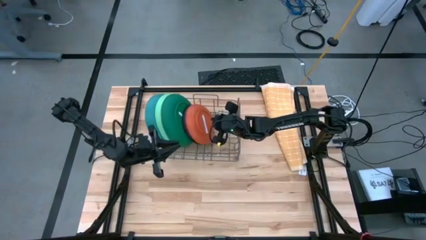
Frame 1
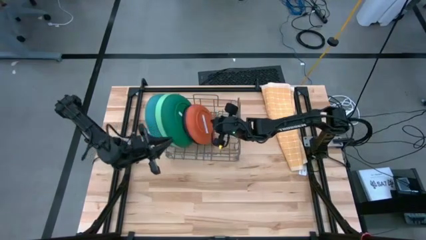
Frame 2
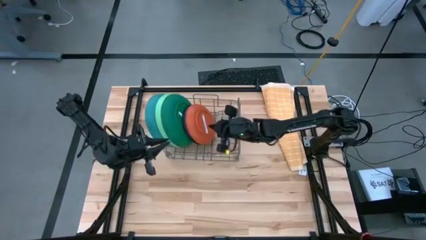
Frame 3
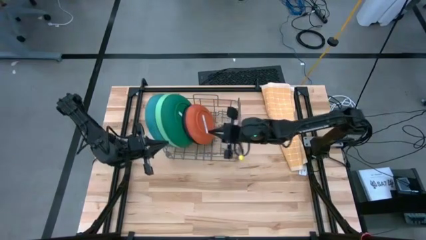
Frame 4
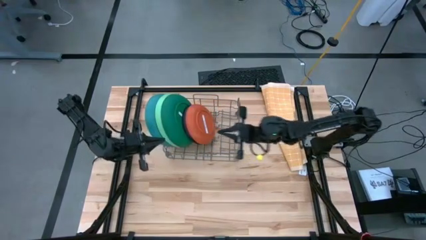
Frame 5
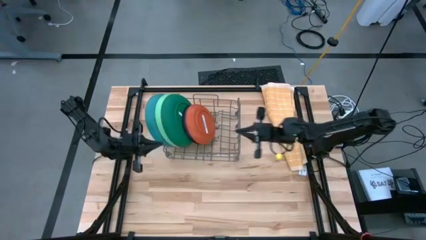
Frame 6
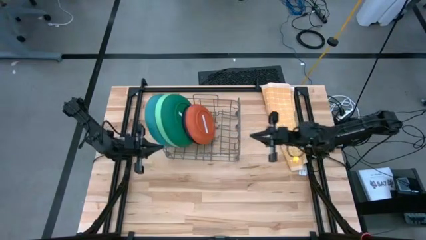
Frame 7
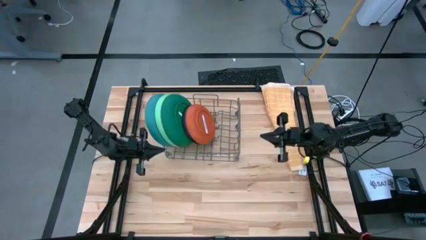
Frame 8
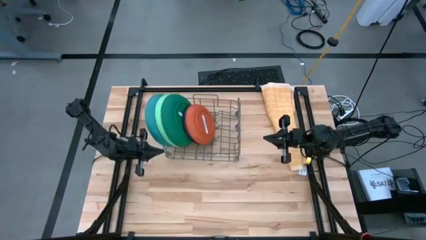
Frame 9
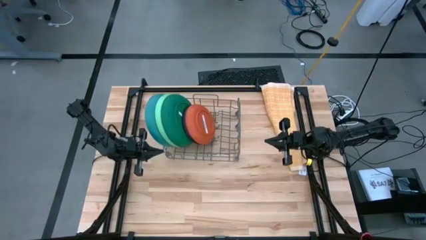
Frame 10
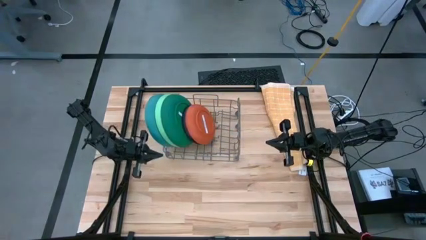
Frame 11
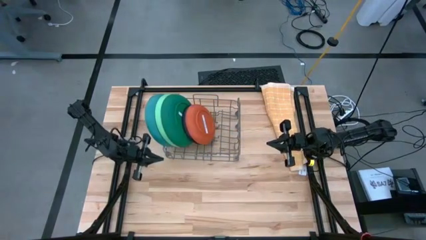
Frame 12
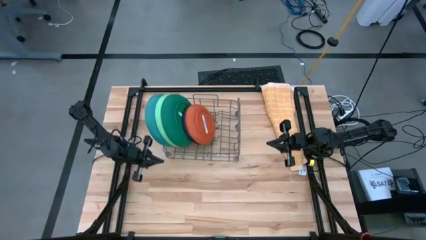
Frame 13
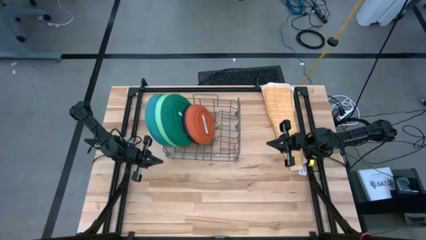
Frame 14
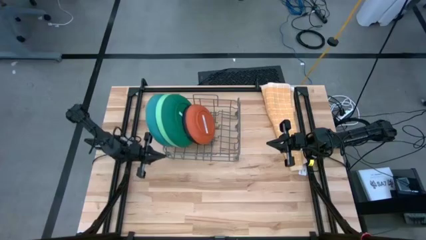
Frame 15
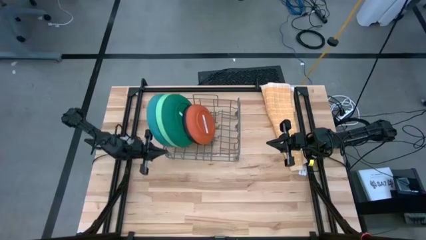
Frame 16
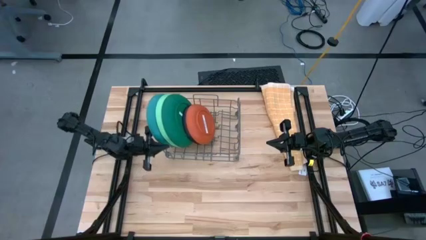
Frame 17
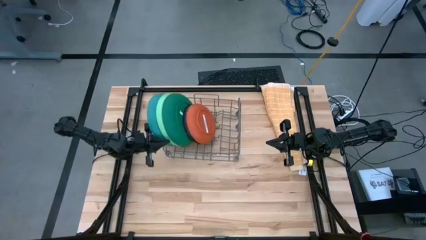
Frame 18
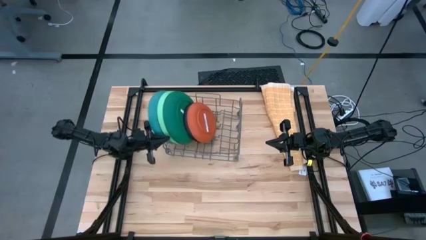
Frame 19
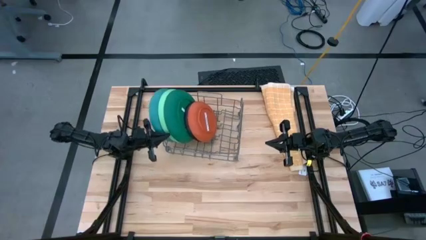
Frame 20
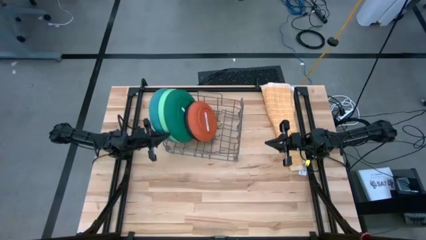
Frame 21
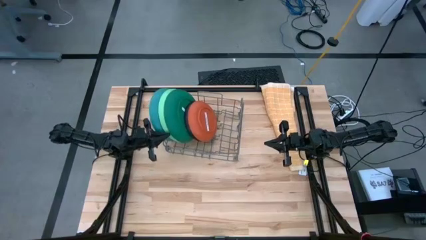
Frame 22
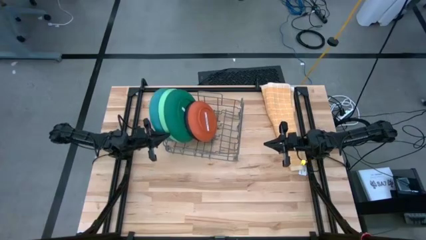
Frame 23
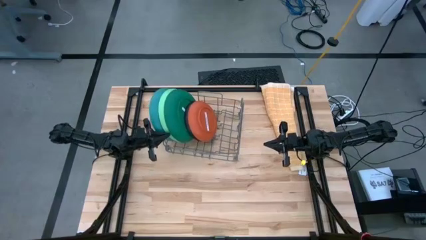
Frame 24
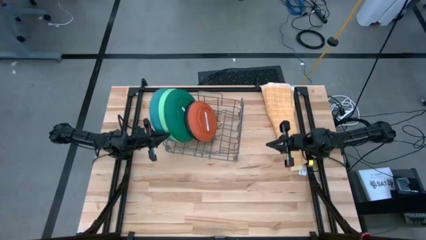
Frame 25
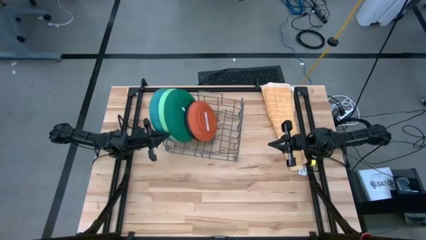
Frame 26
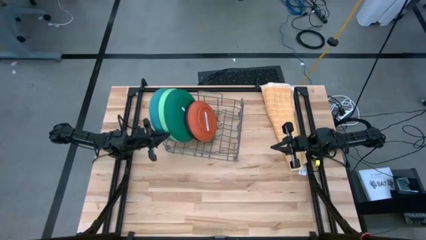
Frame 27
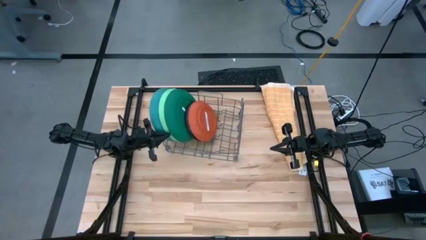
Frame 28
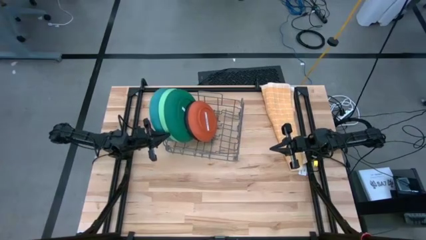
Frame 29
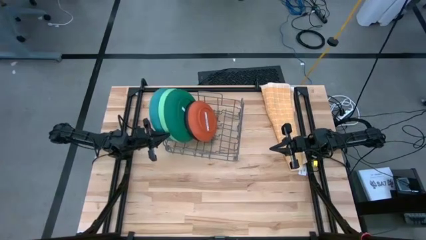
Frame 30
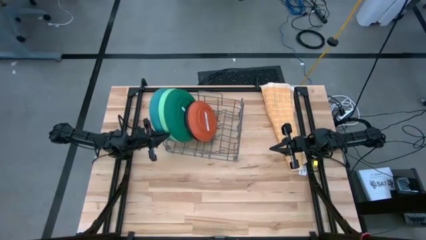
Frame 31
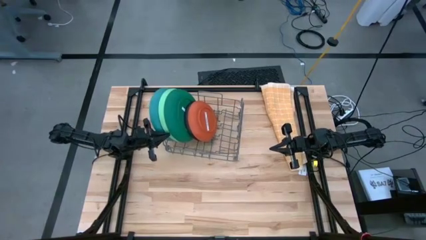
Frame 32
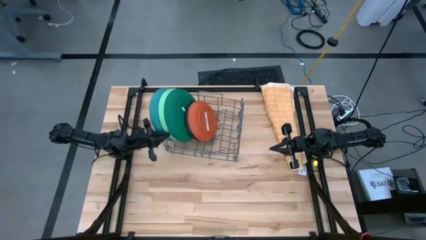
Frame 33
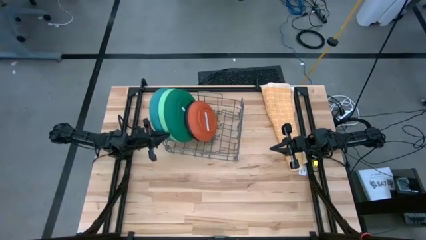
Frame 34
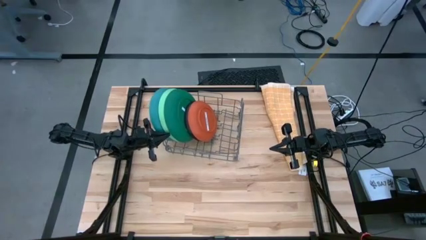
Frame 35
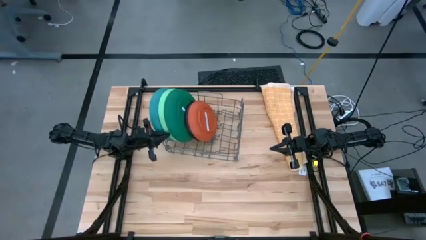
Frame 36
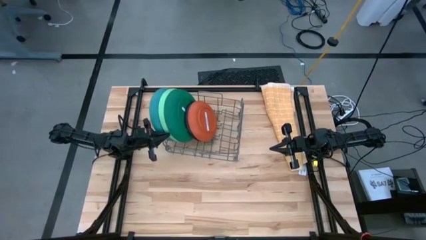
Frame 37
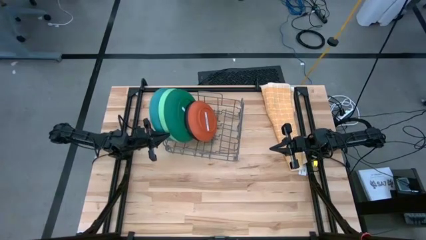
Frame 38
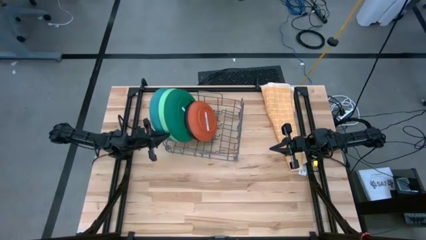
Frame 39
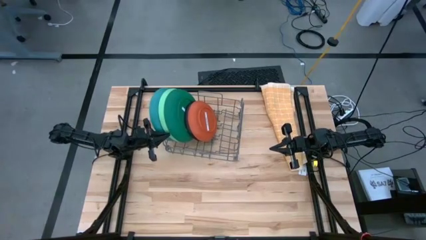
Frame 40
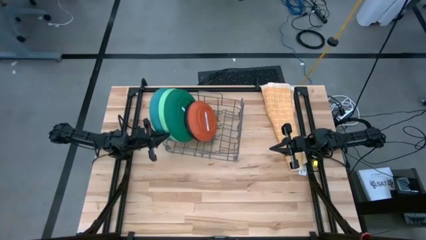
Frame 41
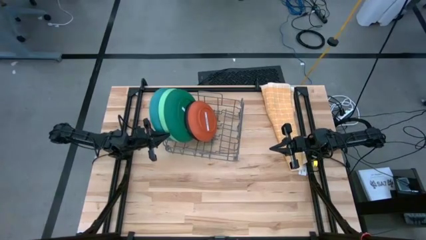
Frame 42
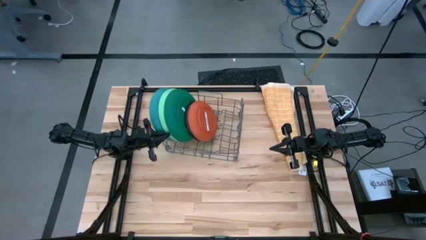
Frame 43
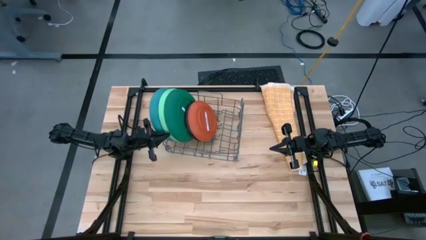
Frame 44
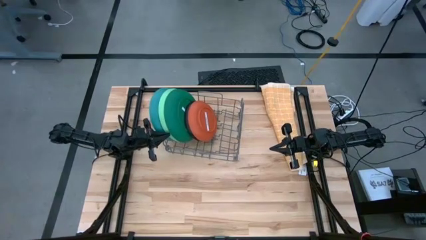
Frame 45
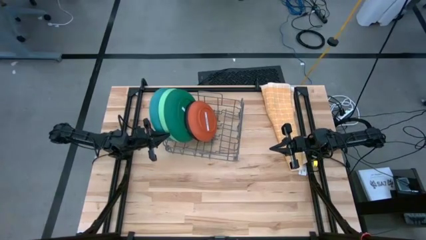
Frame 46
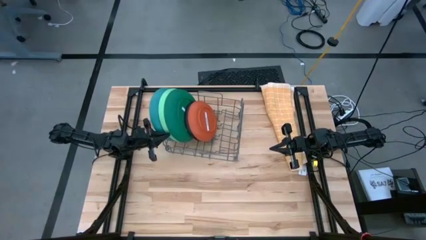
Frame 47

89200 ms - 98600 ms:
Task: Sort dishes
Return to Home Position

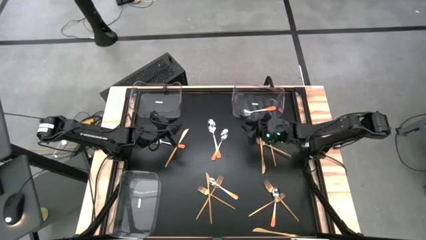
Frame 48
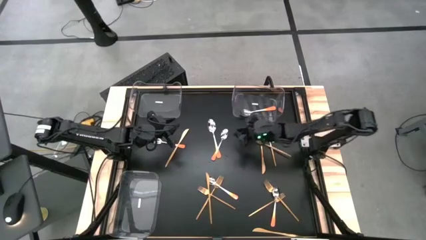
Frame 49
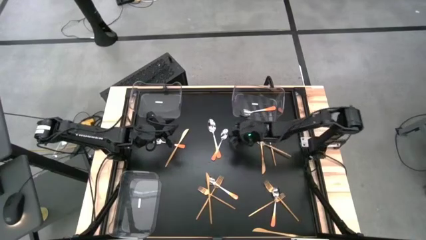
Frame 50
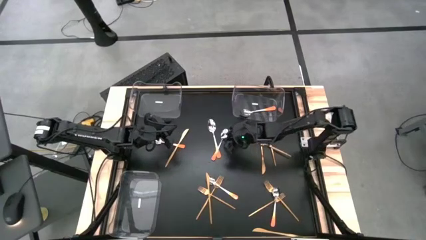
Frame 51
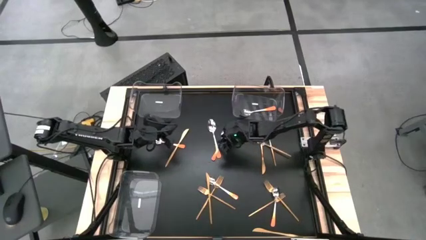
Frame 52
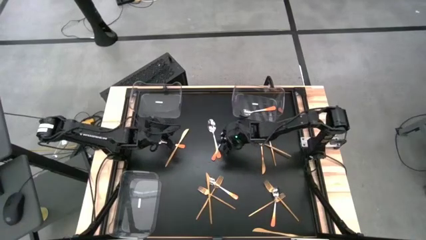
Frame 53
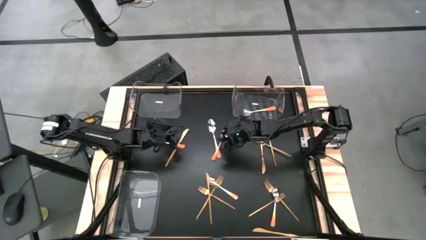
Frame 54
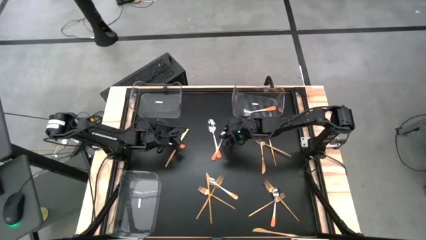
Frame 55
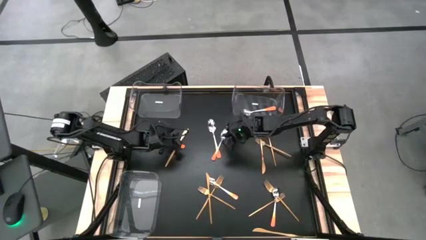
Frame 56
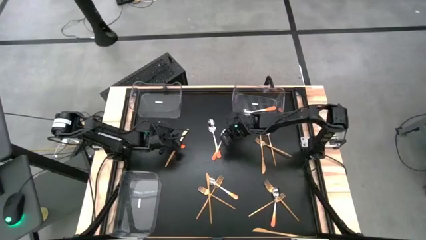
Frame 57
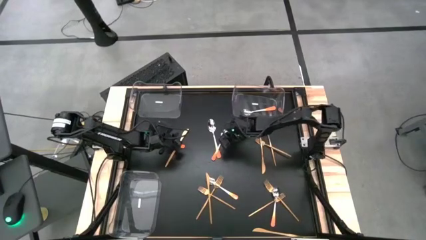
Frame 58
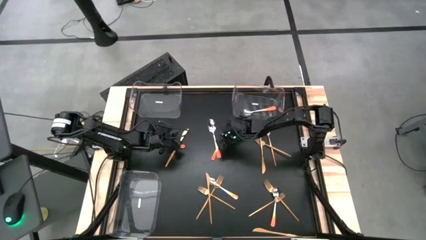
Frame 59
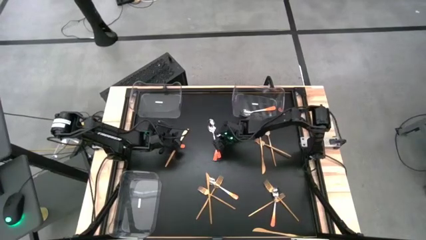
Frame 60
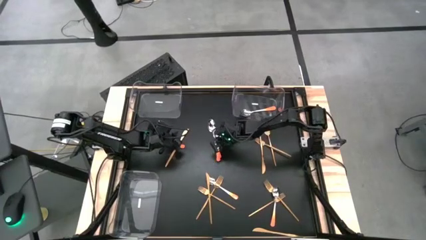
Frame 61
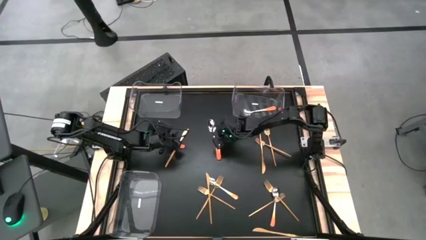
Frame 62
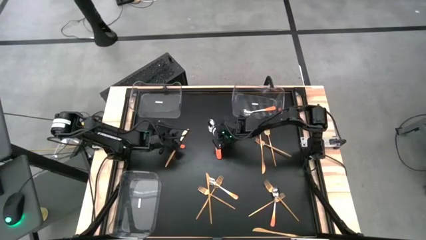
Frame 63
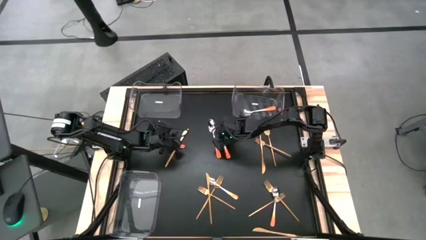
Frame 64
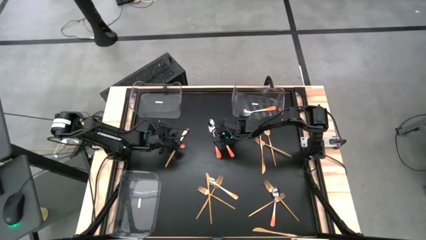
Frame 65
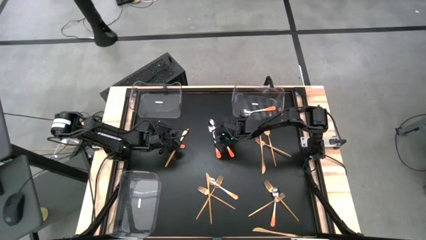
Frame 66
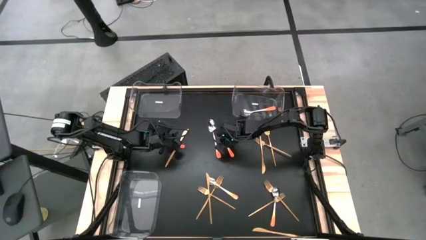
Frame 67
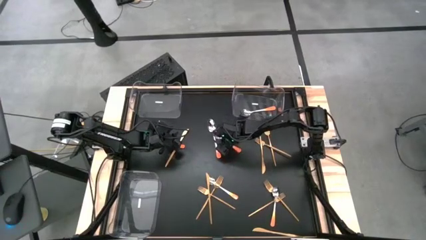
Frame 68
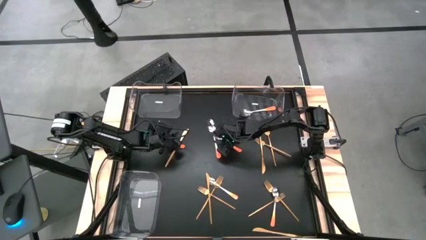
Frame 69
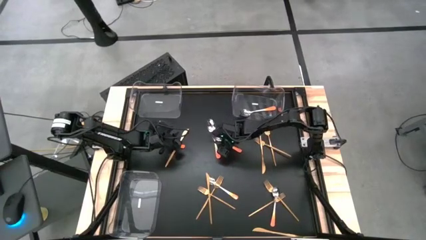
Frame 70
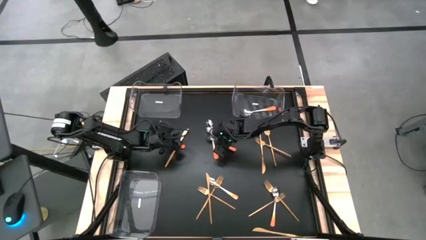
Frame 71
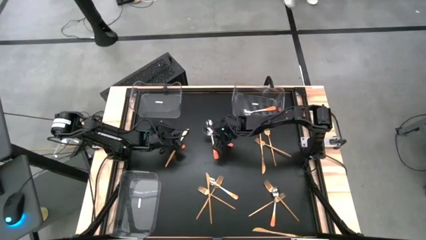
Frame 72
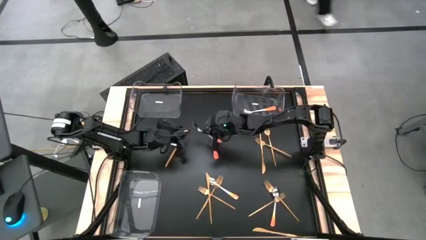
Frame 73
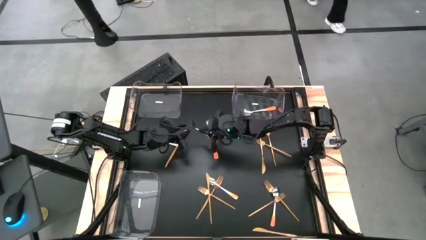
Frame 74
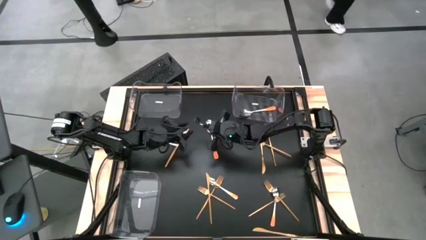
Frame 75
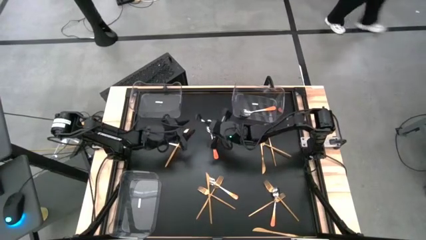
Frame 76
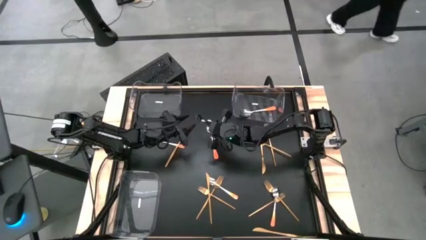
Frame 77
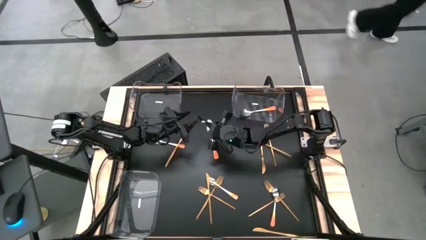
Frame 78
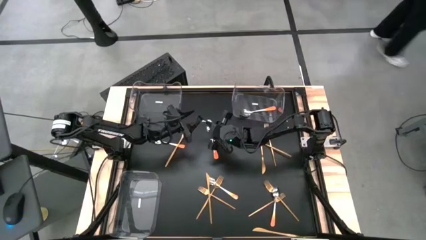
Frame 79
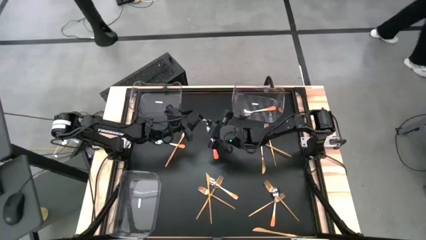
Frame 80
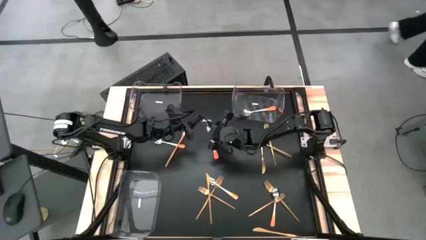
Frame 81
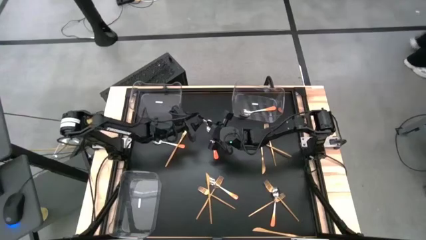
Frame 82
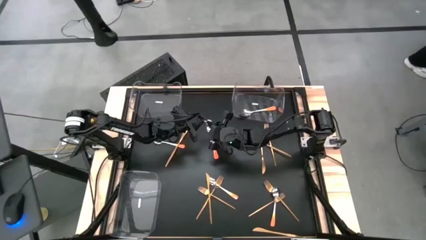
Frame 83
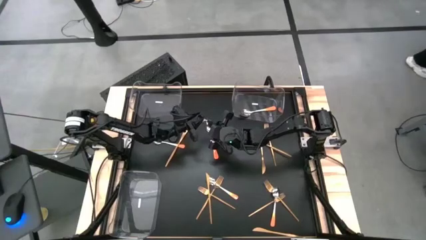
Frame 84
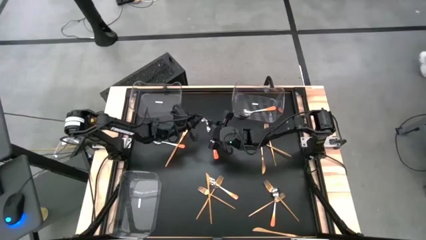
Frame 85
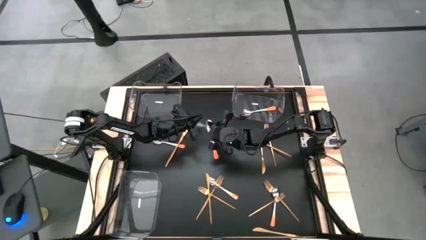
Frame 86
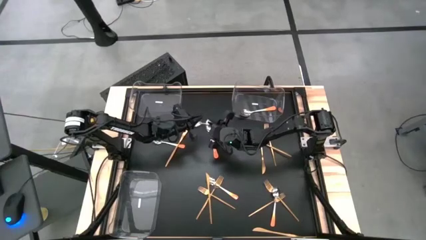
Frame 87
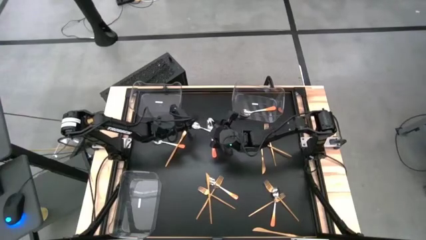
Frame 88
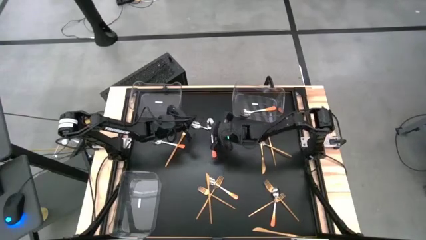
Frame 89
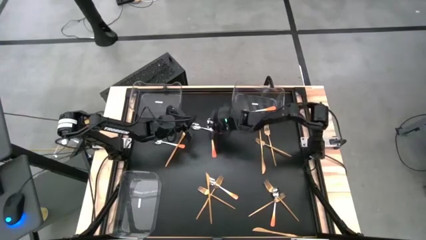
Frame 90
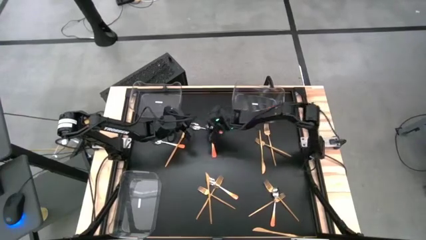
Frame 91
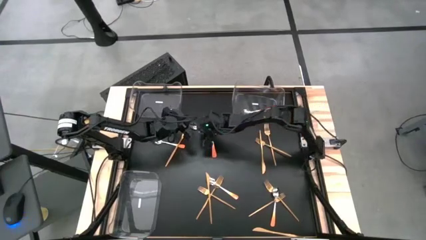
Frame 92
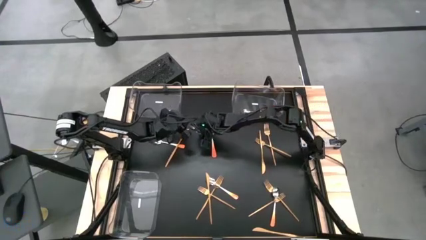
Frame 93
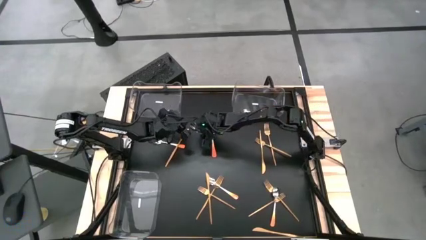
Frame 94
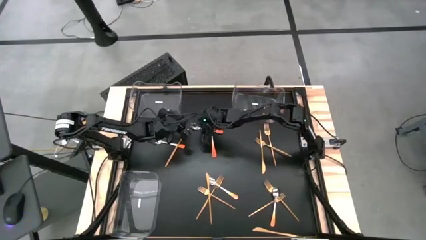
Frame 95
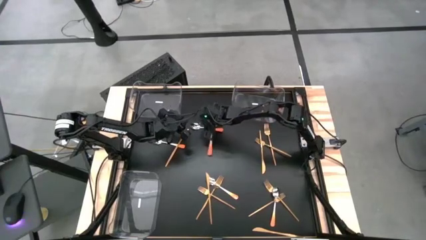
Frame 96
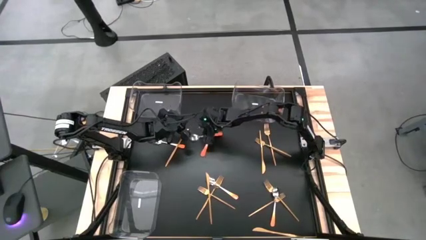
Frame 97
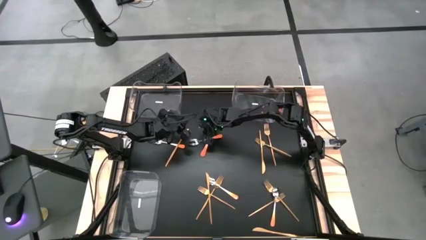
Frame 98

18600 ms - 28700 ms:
Task: Sort silverware by color (type)
Put the silver and orange spoon into the top left transparent bin
